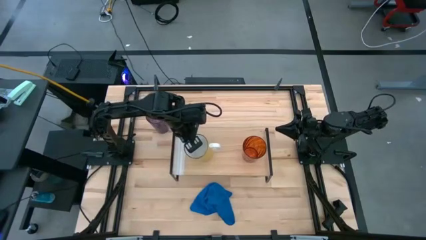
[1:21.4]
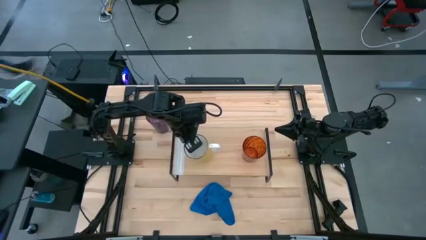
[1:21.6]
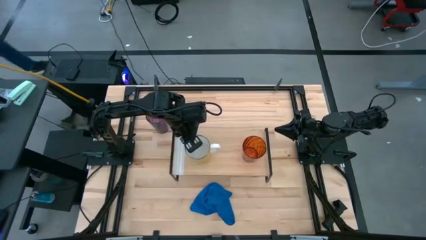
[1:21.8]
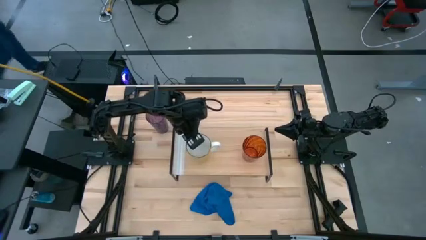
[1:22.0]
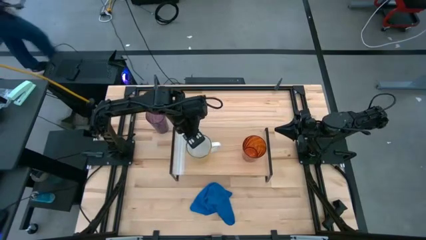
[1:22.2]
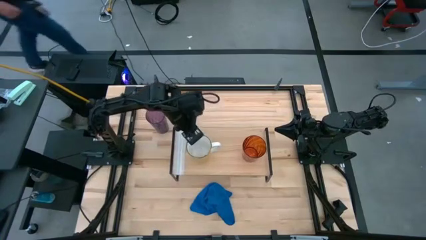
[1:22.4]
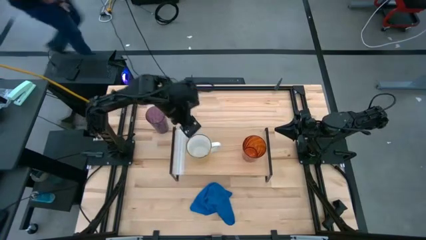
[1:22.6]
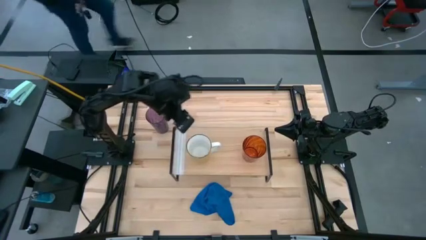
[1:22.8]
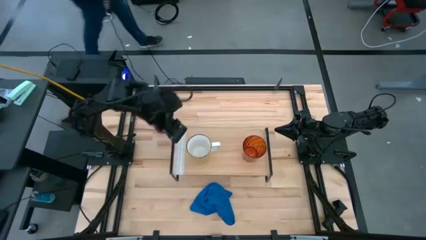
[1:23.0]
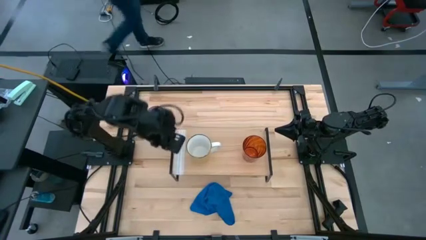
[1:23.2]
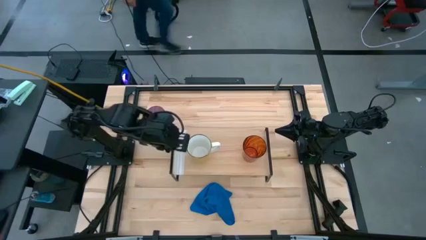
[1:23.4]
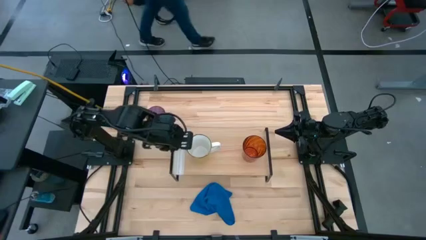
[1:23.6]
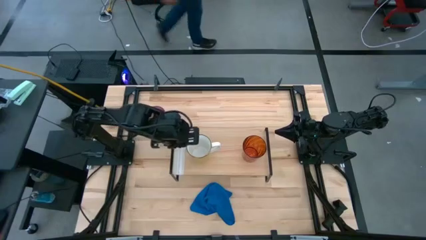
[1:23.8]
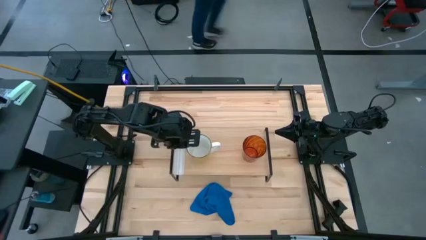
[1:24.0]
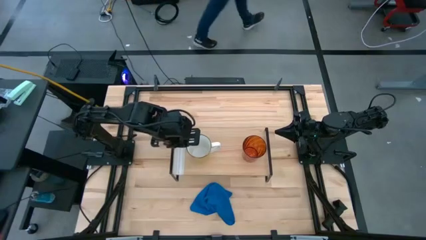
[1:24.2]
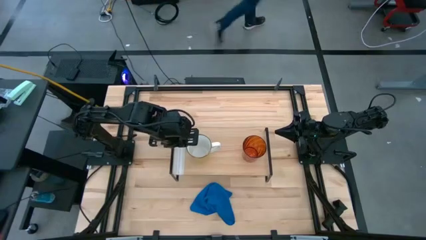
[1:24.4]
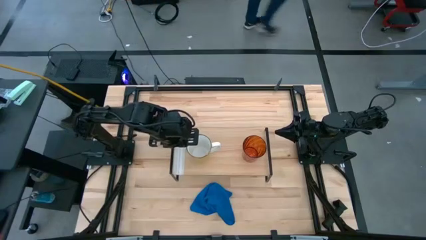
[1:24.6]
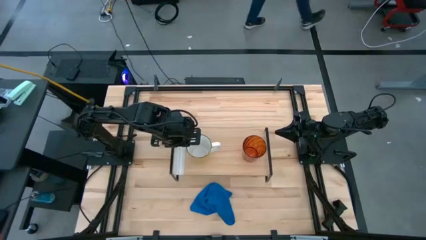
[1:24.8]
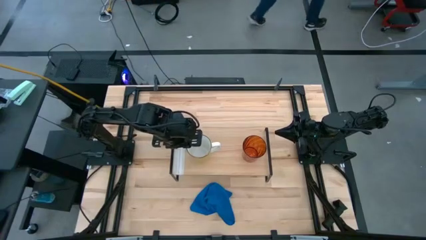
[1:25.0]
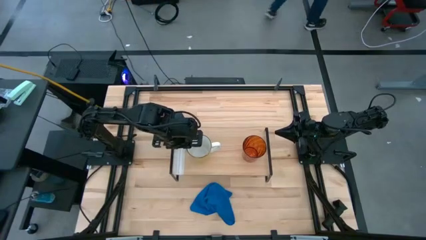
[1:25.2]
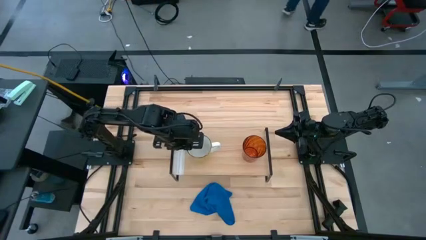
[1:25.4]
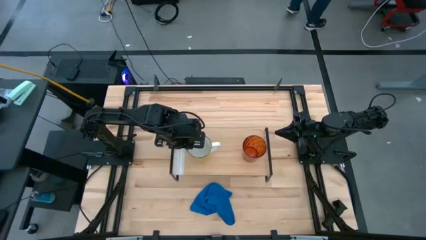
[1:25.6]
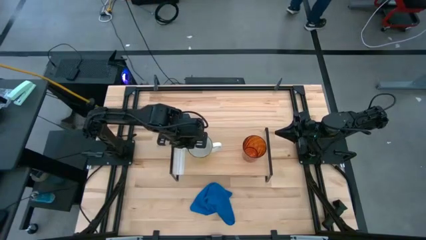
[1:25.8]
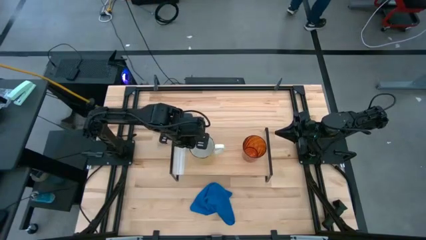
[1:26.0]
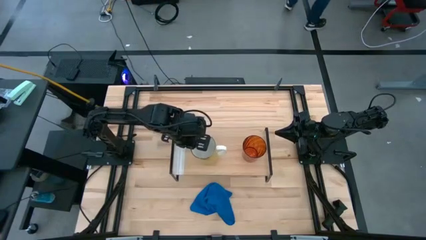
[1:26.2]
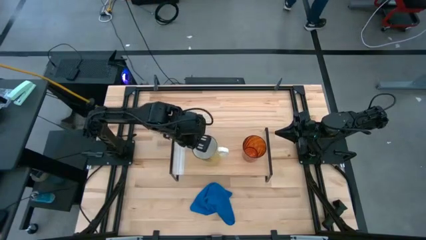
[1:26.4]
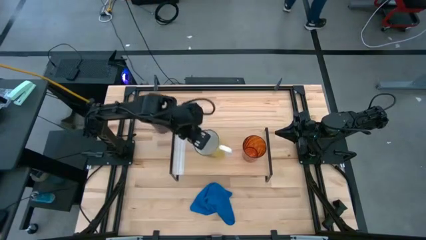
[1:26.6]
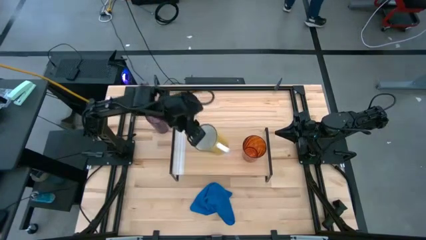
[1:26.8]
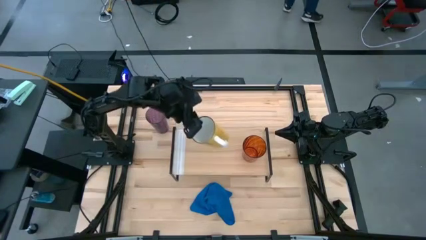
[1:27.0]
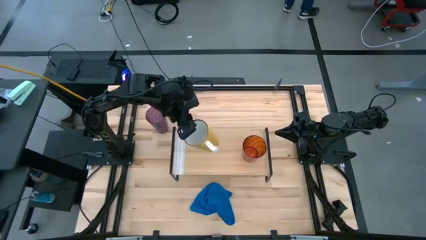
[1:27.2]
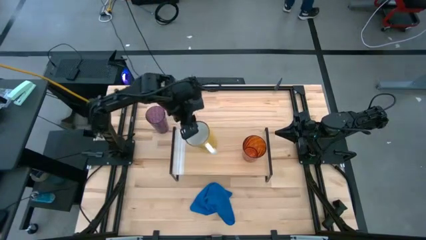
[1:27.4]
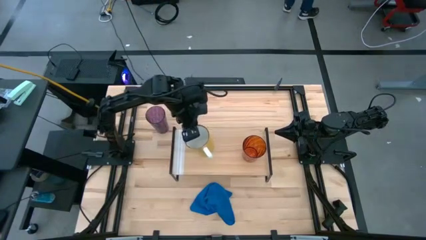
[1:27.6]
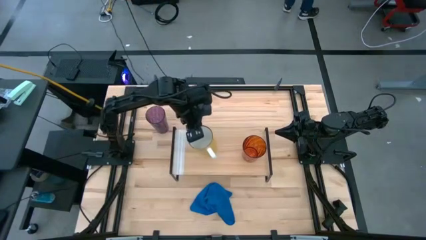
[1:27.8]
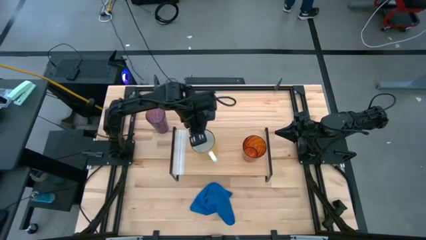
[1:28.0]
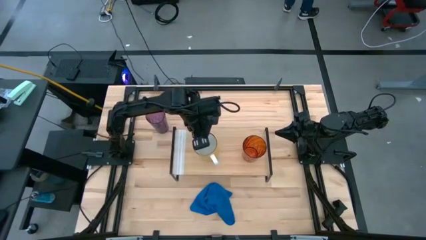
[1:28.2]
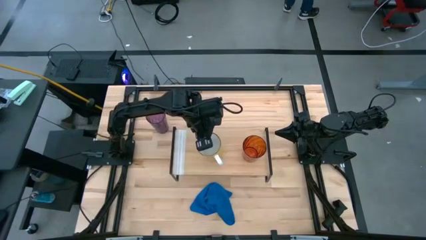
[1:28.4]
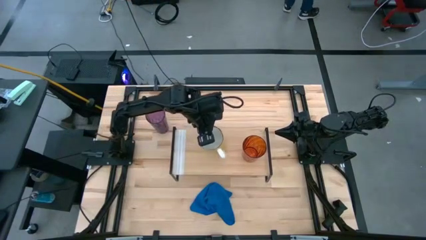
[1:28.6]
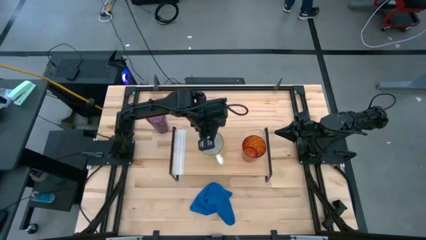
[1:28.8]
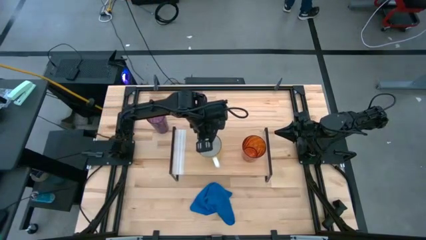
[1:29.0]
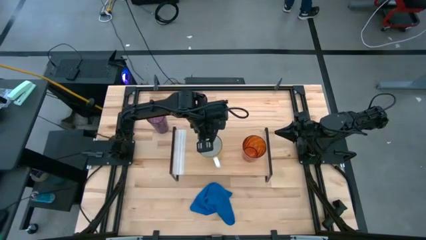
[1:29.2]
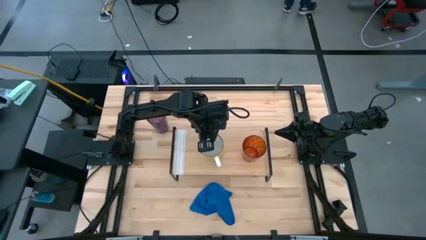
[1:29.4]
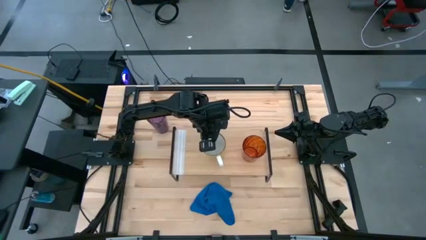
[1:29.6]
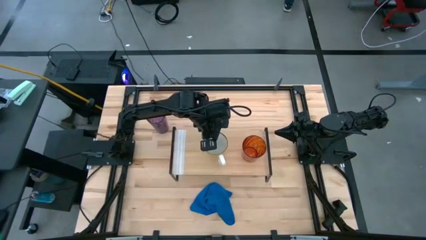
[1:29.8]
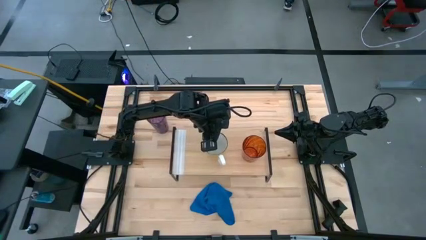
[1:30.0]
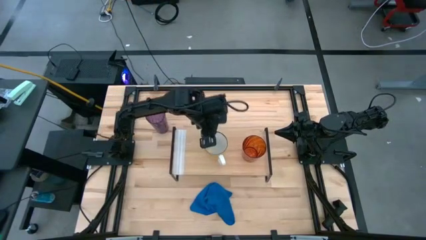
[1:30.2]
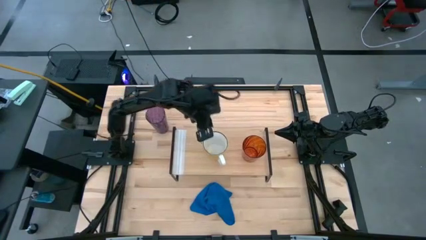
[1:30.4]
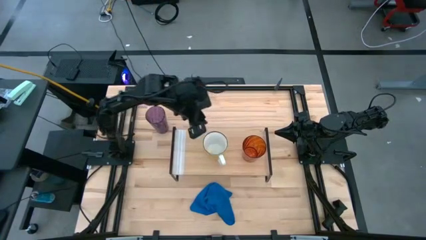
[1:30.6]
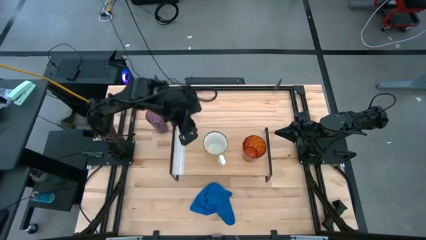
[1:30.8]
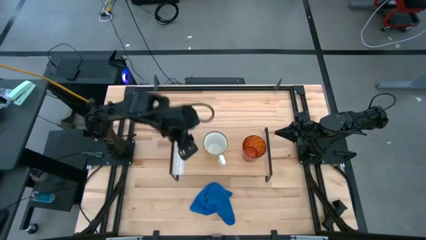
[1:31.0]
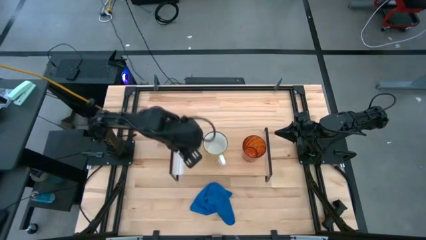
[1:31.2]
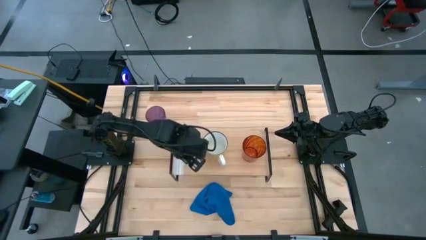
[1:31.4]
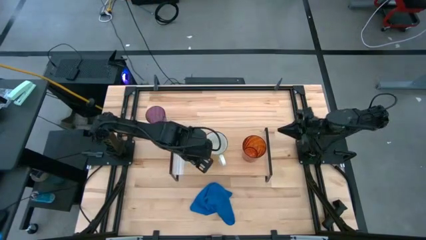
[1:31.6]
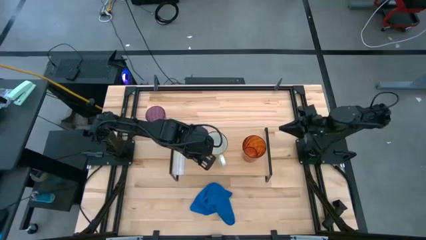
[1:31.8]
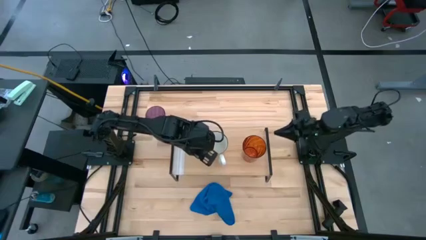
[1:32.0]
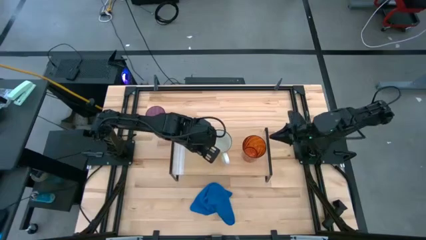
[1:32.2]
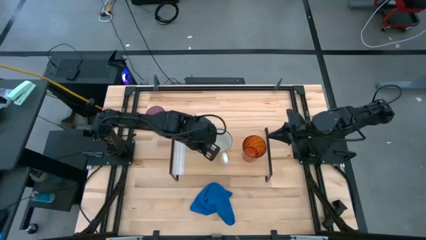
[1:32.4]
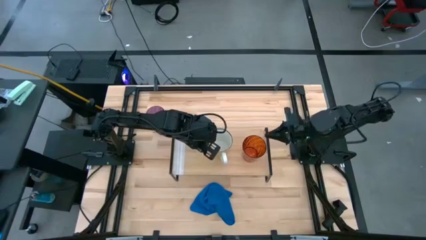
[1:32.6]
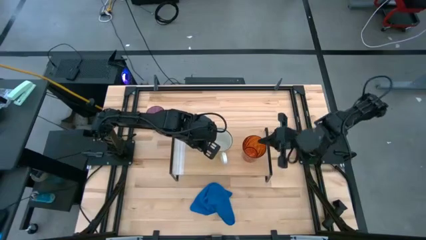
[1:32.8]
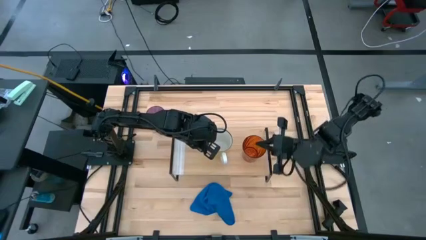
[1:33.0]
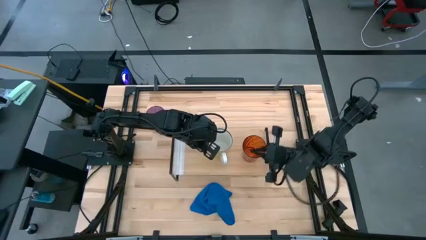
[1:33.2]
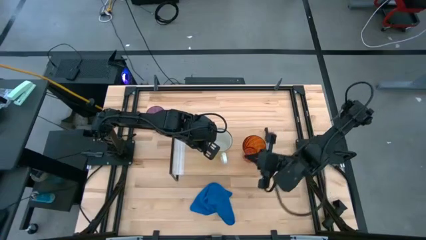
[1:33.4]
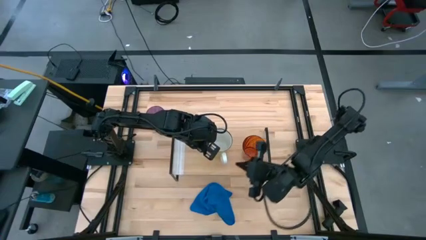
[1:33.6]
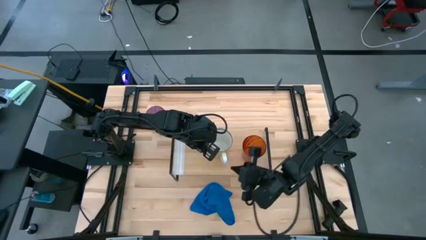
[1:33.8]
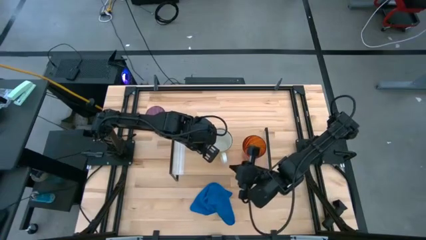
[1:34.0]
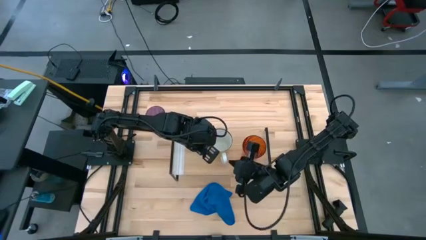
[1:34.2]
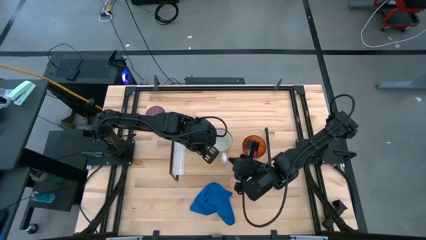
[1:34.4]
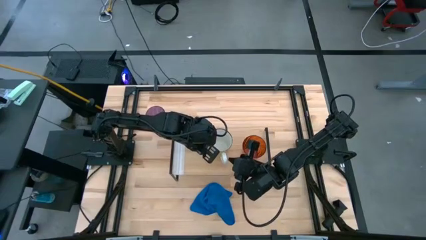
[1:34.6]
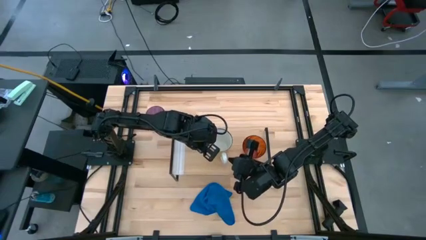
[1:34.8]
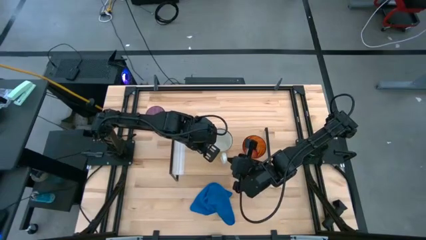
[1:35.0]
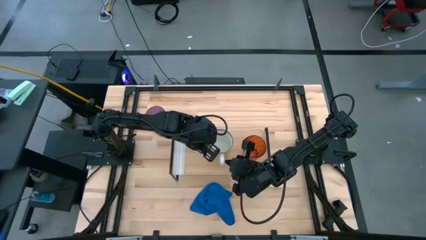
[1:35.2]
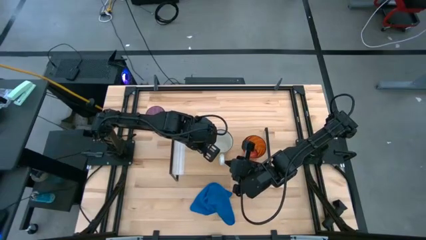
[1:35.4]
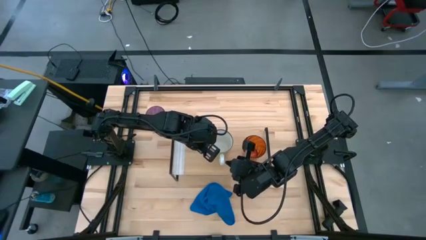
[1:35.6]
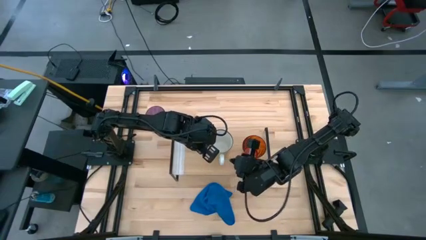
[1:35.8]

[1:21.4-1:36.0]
Task: Stack small to large cups/mugs on shelf
Put the yellow mug on the shelf
